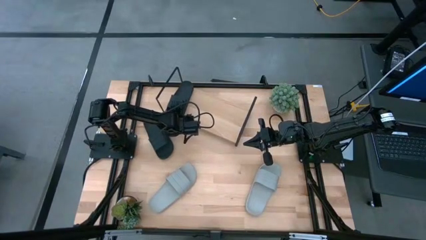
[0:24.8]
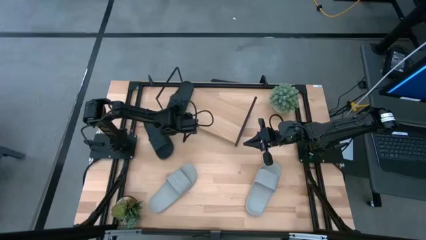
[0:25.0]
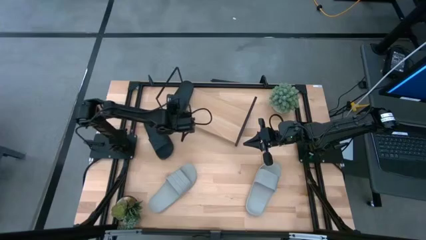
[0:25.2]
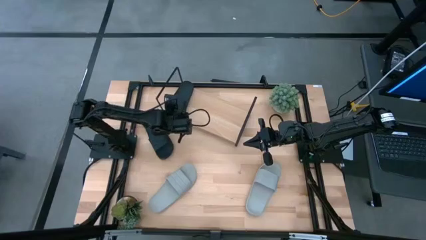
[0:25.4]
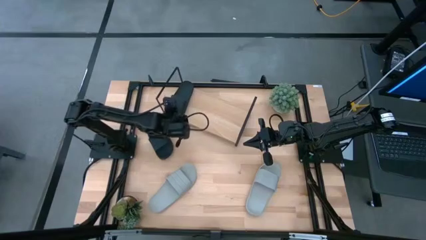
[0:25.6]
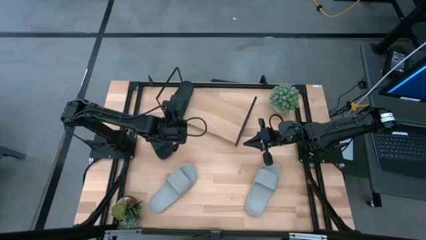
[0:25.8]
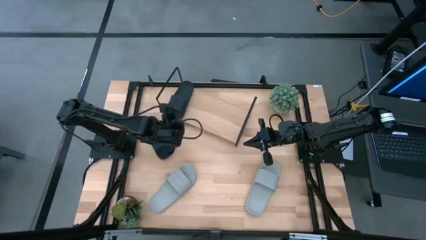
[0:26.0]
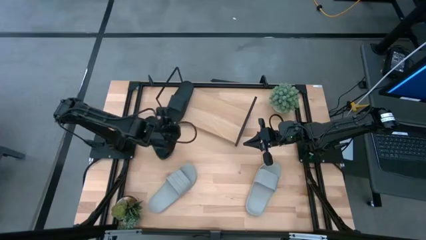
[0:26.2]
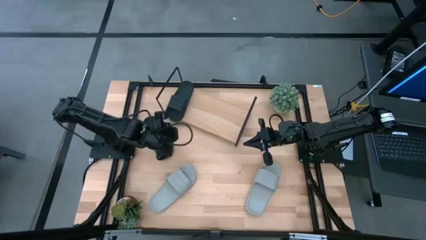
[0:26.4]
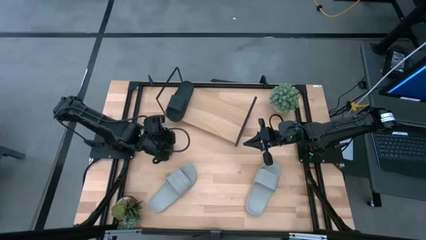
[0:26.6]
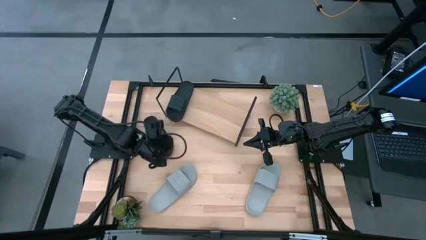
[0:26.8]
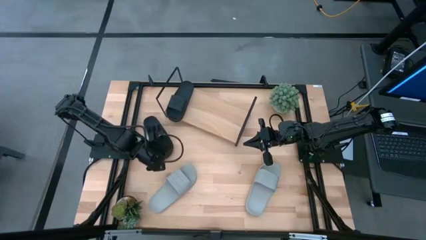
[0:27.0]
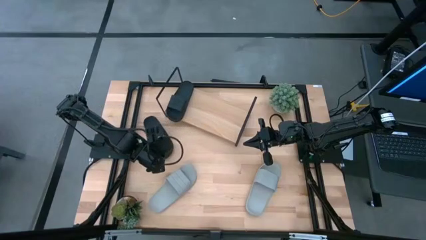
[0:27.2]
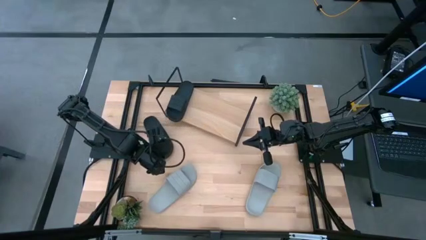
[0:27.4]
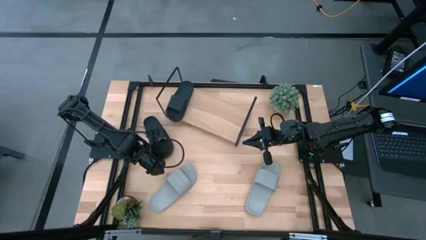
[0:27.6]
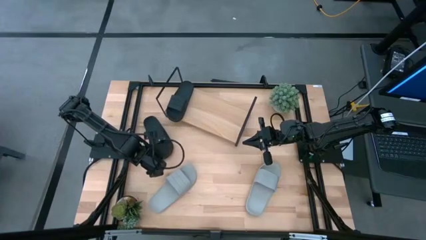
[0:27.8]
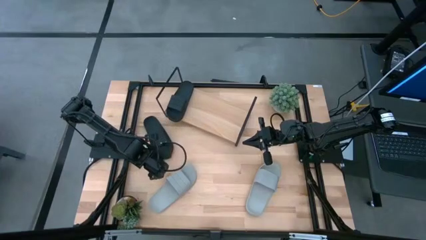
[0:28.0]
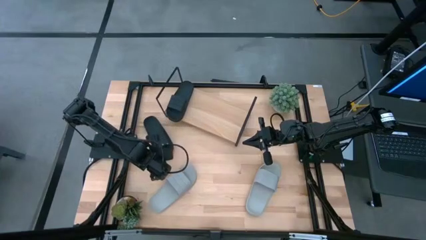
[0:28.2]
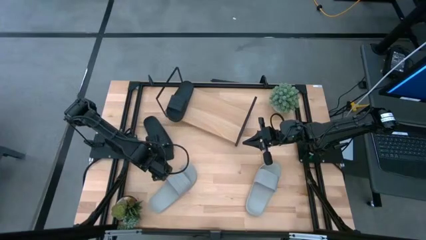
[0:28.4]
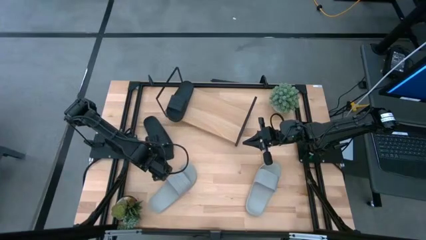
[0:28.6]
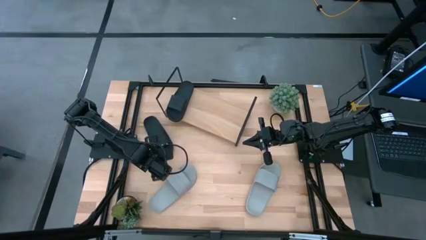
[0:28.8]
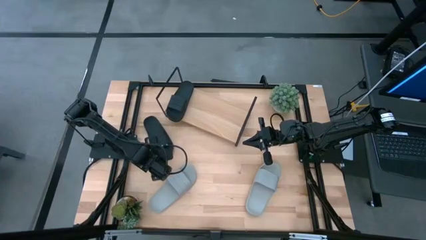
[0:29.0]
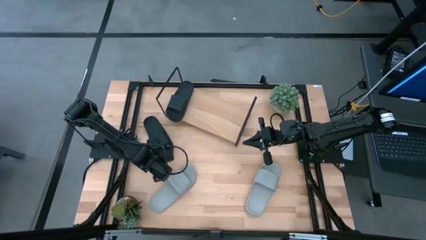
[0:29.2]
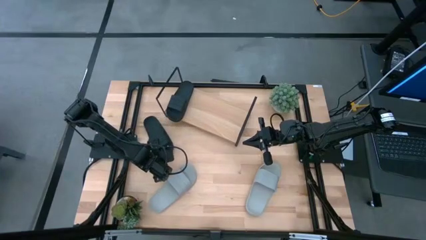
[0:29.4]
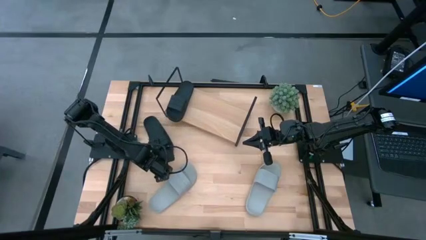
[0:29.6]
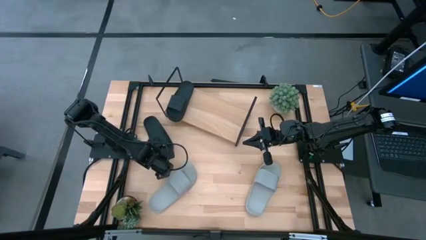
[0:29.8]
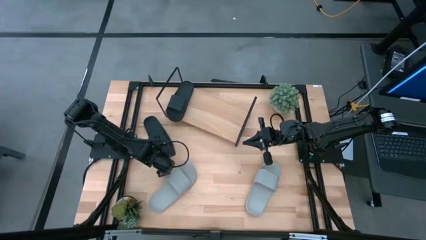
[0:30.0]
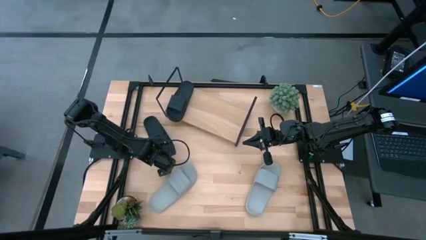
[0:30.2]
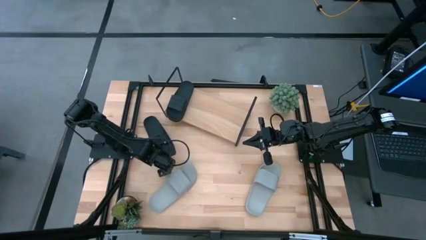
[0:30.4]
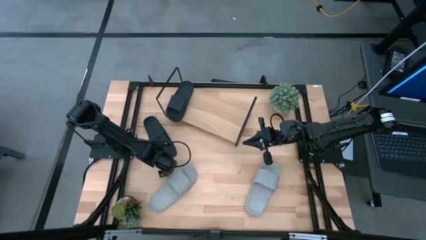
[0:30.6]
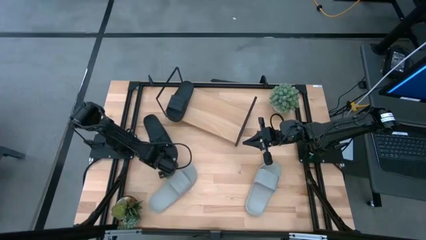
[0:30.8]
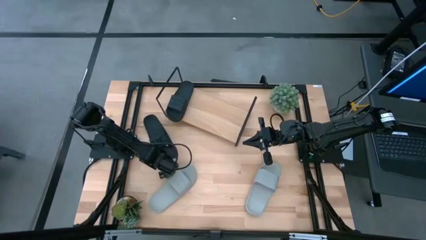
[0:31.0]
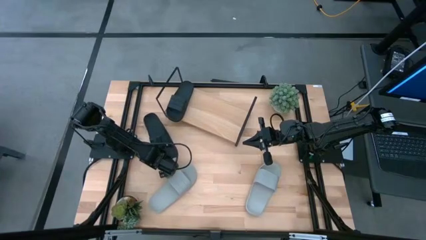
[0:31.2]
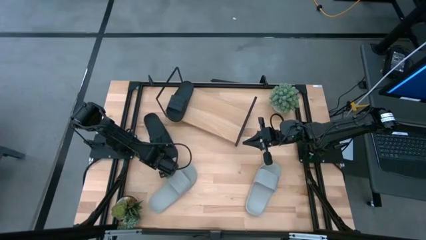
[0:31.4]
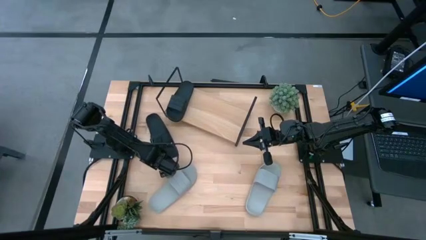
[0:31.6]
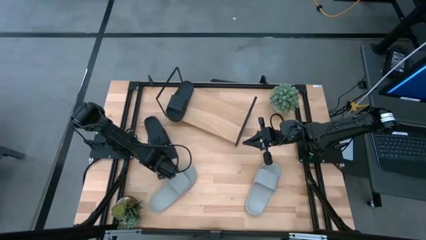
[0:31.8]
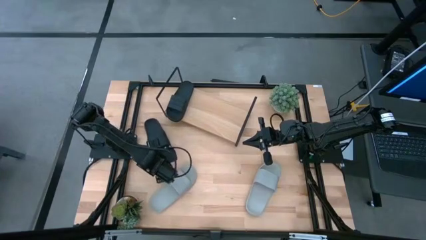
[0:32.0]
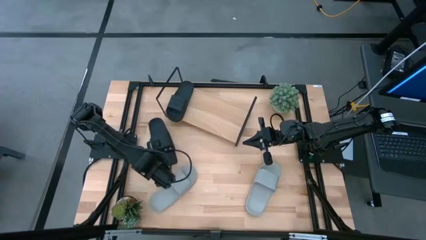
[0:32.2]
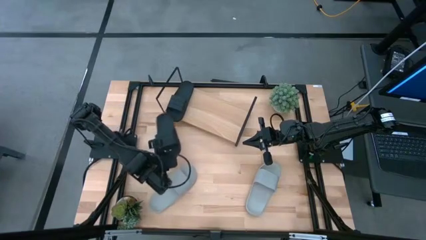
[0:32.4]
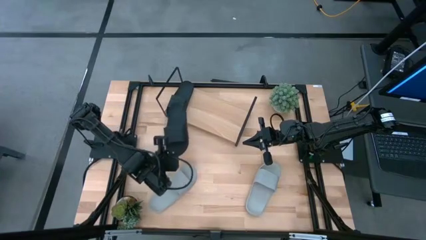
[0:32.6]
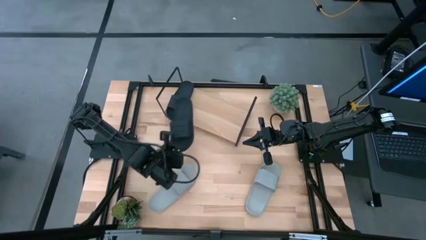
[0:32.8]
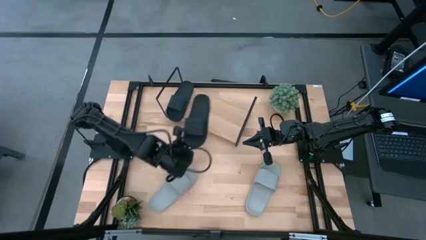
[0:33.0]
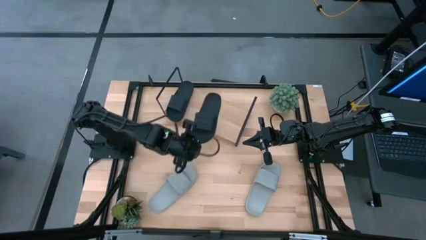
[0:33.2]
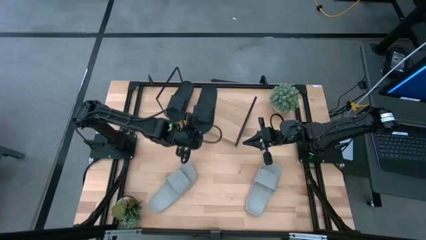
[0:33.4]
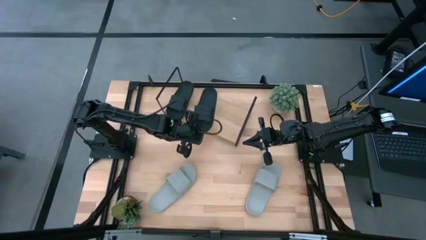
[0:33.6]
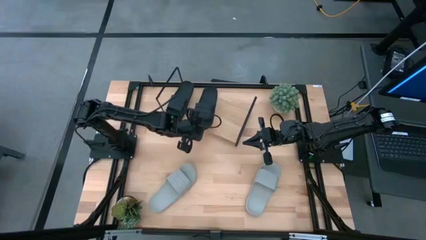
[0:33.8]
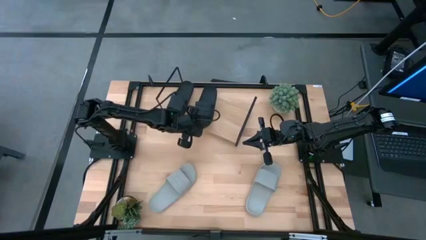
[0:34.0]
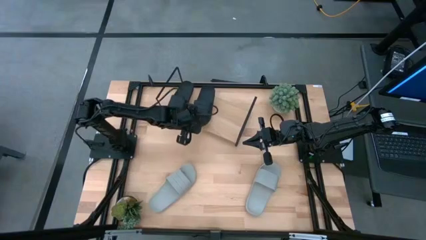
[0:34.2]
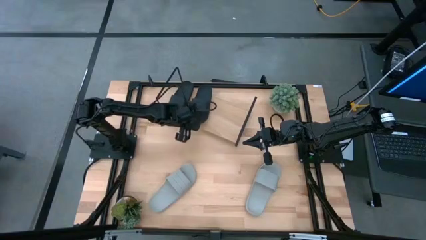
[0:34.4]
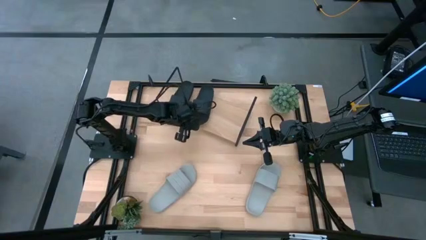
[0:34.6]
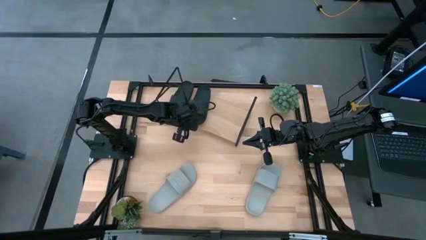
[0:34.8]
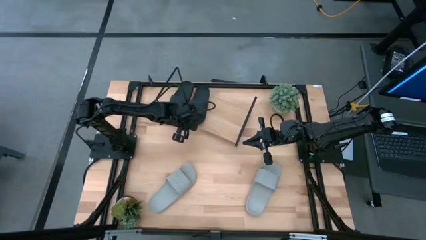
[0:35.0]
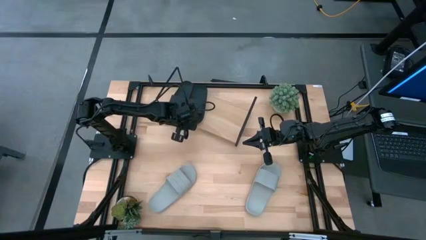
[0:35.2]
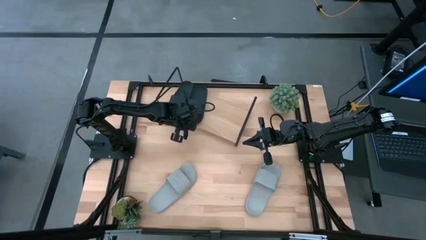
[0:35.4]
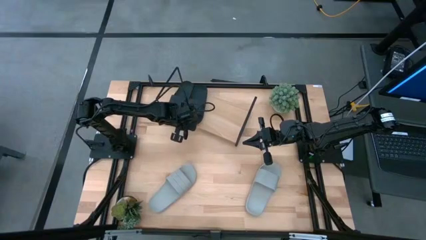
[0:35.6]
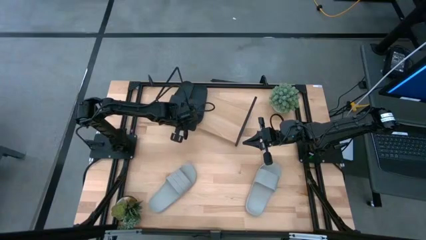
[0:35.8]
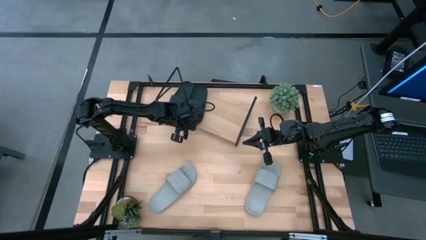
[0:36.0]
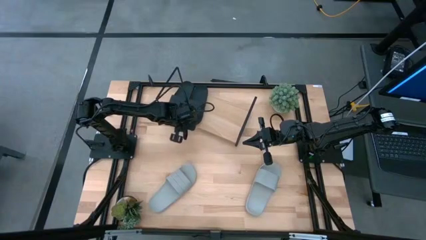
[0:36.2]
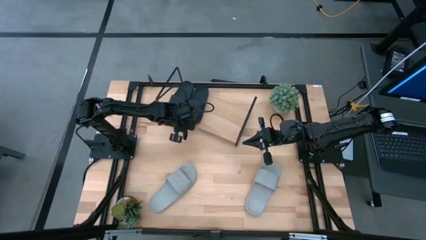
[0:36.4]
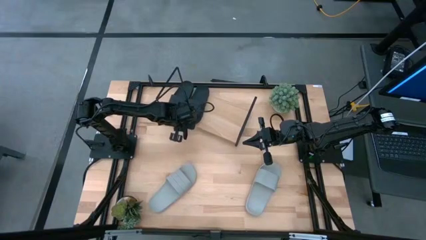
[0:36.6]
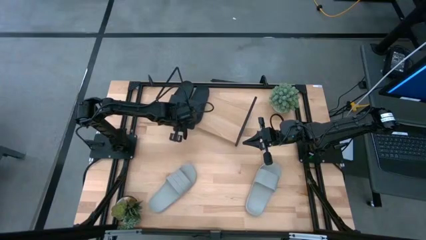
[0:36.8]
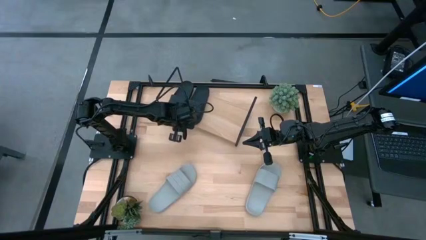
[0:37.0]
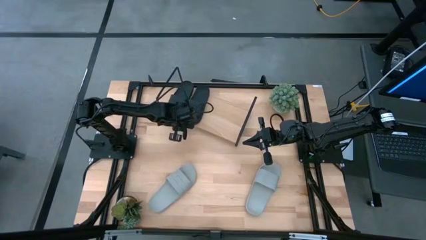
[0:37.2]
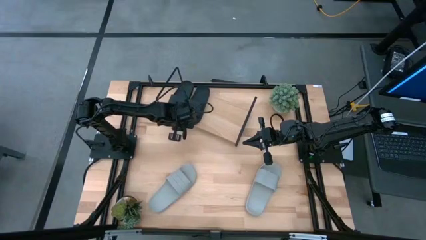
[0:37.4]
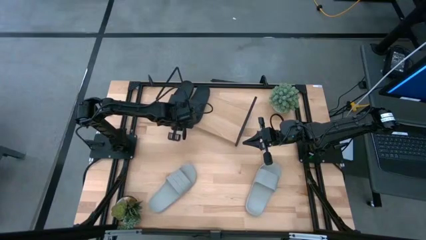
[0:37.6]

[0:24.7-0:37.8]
Task: Pick and place slides into the shelf
Put the black slide on the shelf
